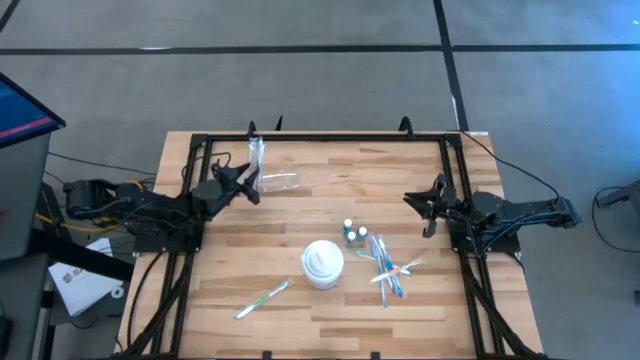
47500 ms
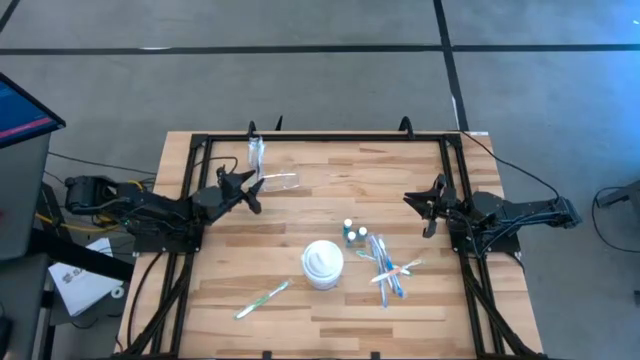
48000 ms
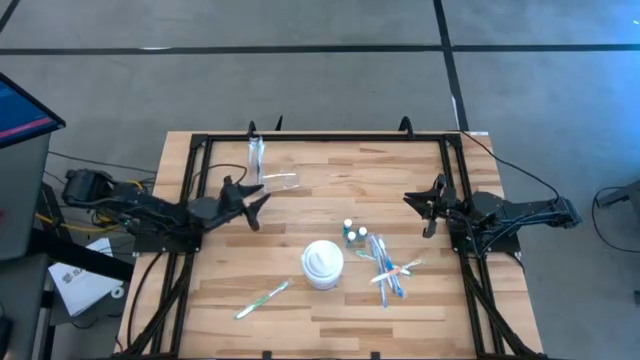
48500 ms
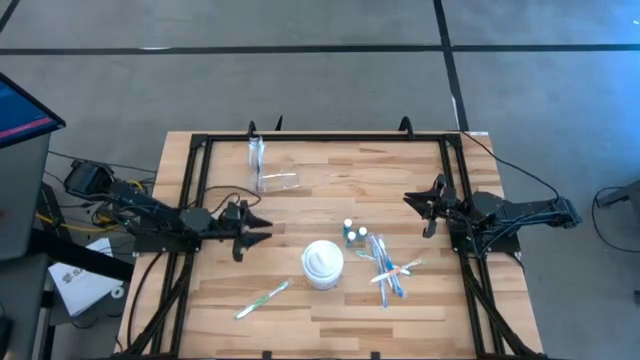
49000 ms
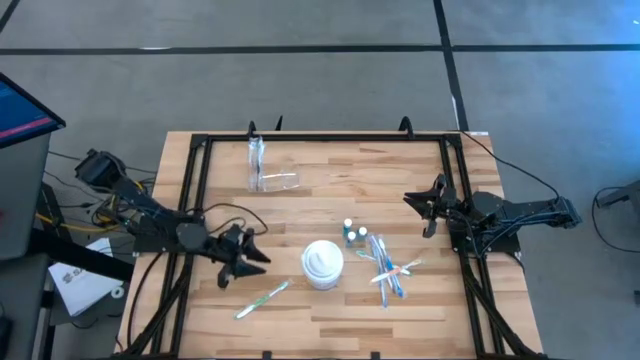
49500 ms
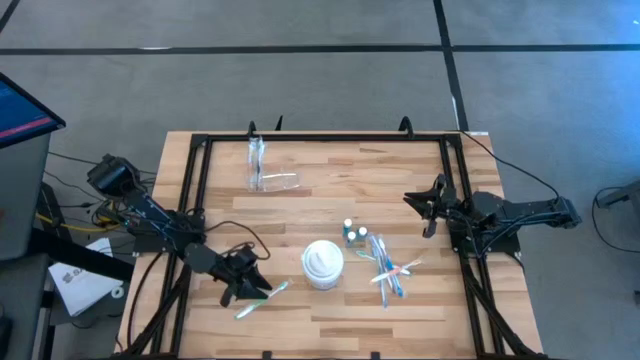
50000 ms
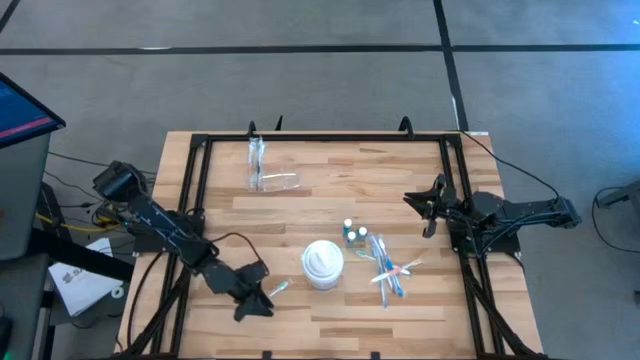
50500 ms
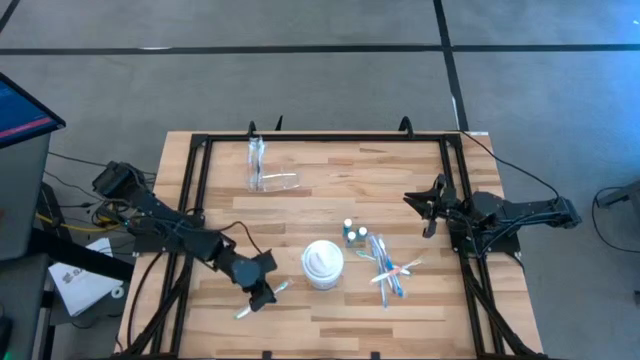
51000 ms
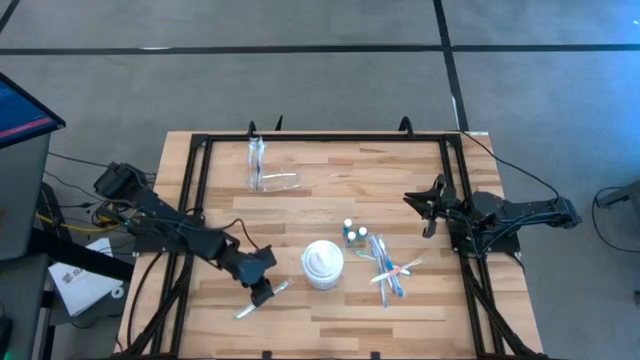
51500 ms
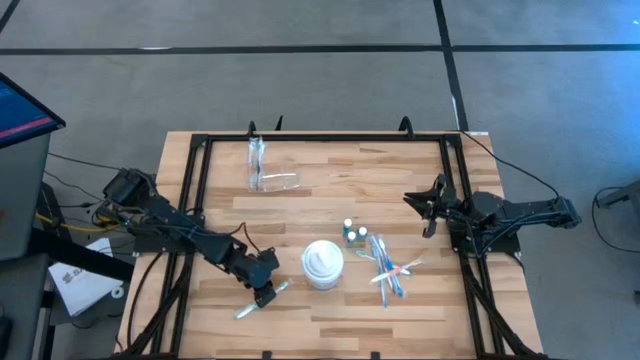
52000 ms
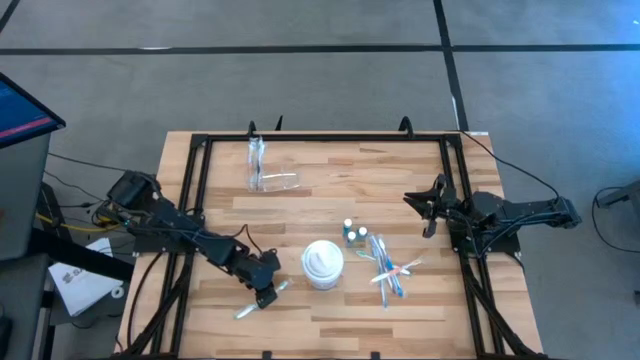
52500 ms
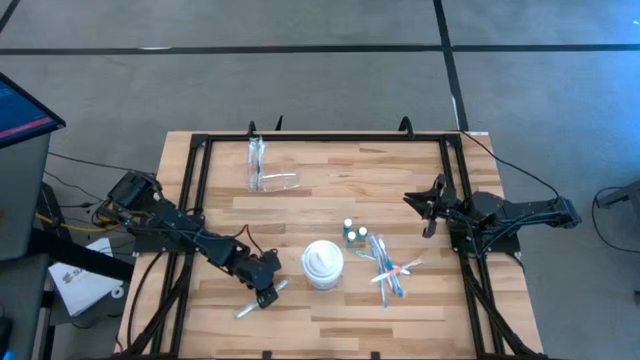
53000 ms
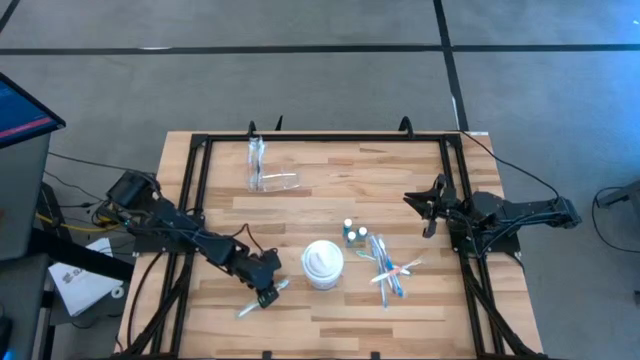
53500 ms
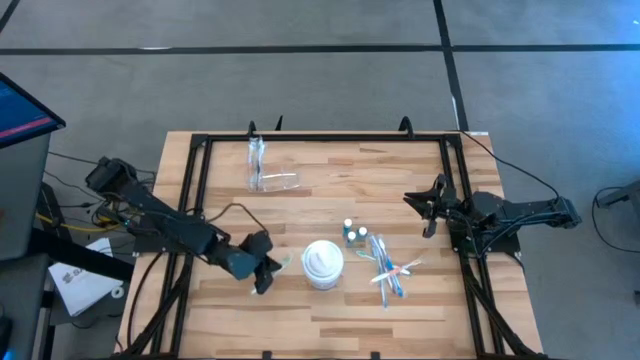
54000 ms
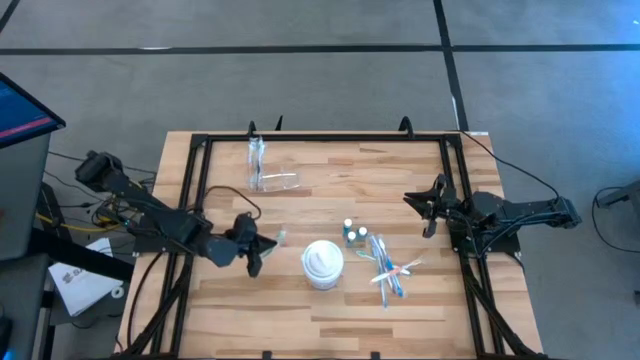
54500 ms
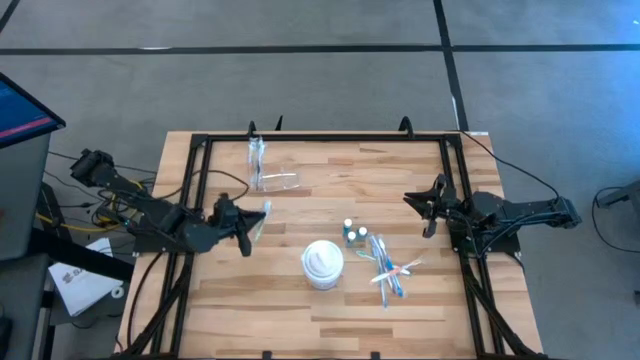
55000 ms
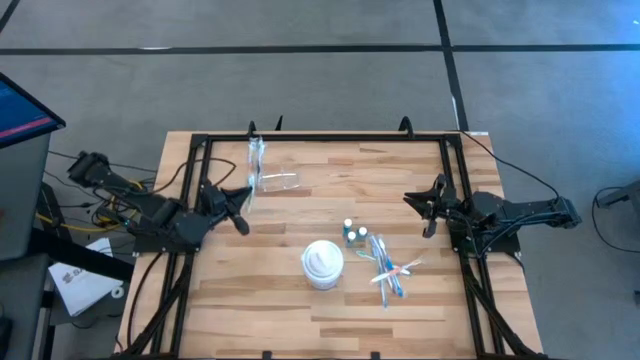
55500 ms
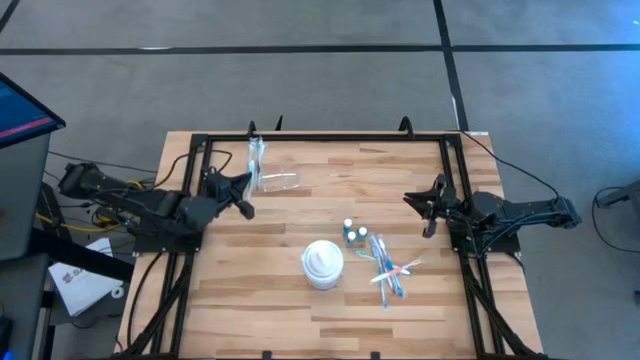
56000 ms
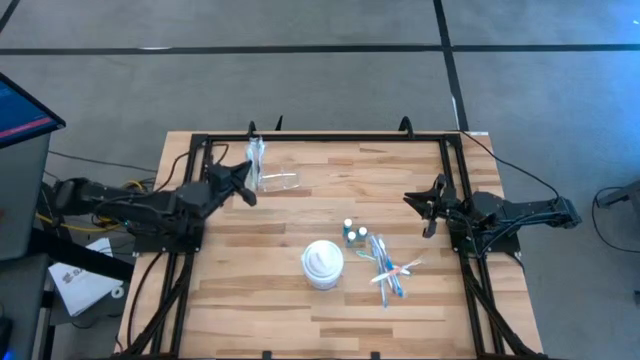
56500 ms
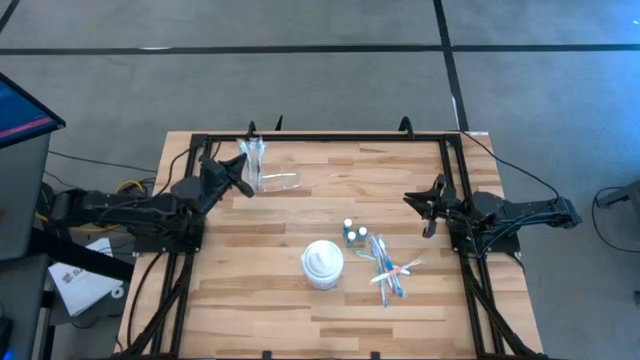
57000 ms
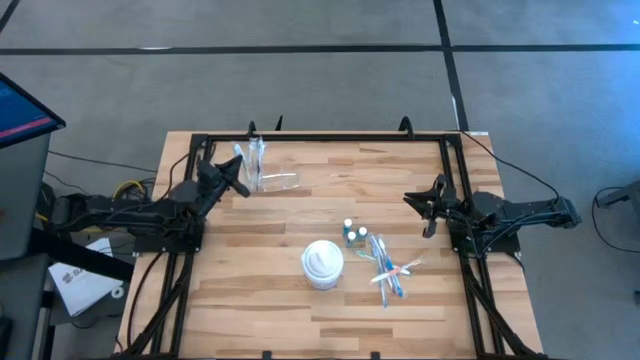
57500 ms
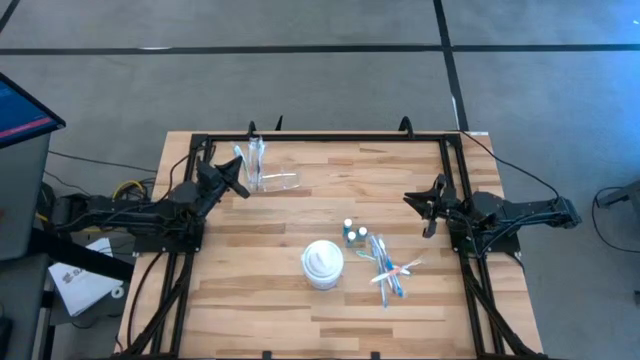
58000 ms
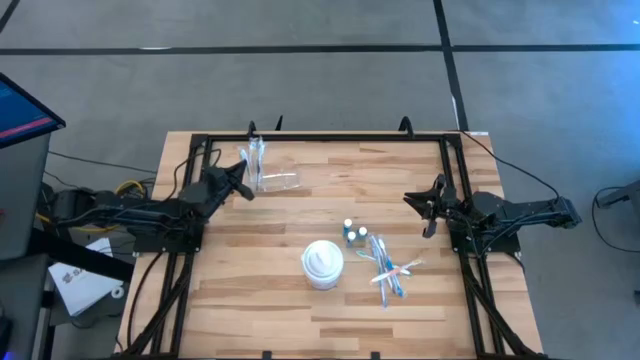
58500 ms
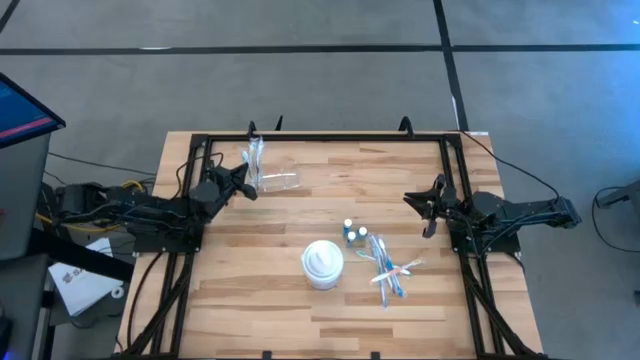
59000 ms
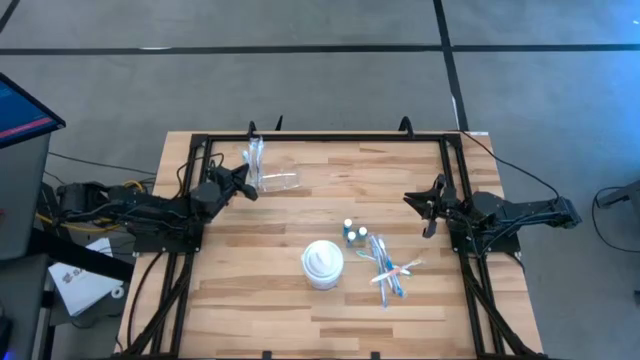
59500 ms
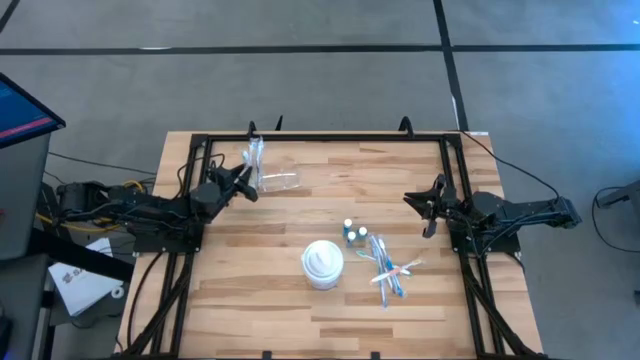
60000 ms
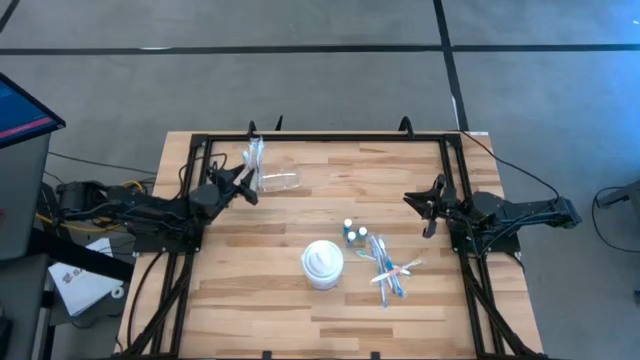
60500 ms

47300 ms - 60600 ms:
Task: Pick & Place toothbrushing station
Put the left green toothbrush into the transparent organizer

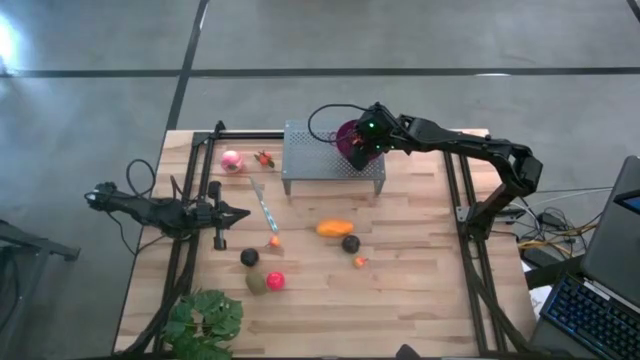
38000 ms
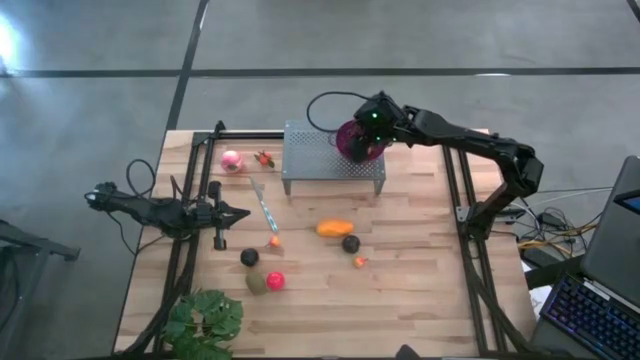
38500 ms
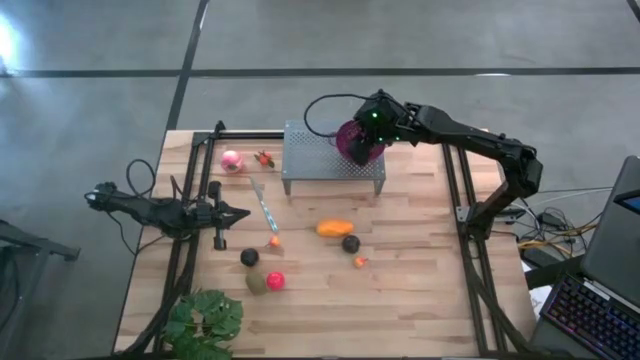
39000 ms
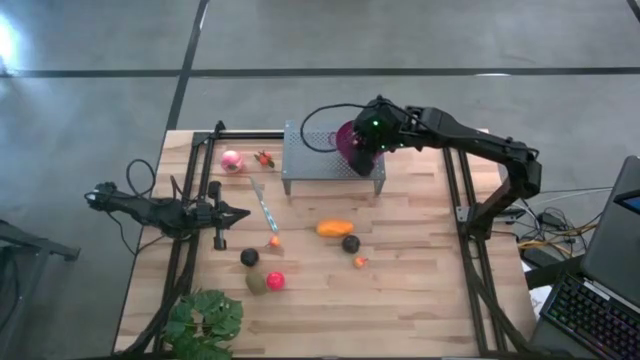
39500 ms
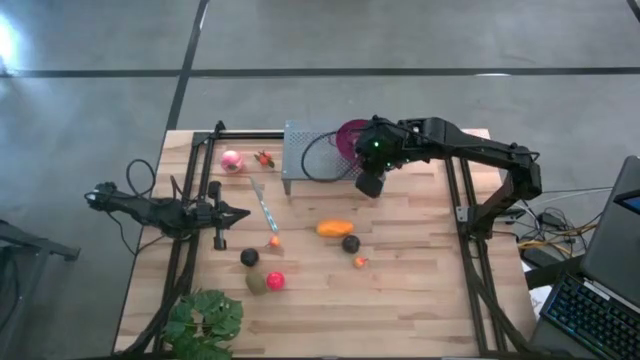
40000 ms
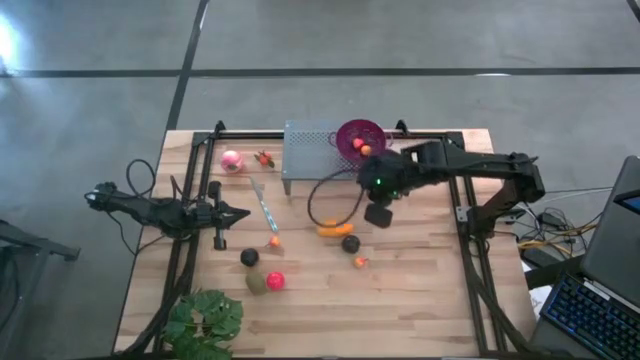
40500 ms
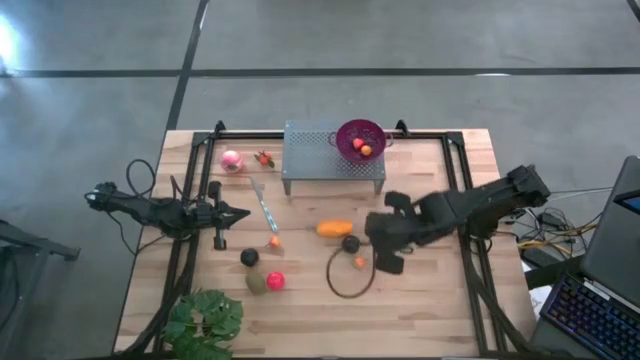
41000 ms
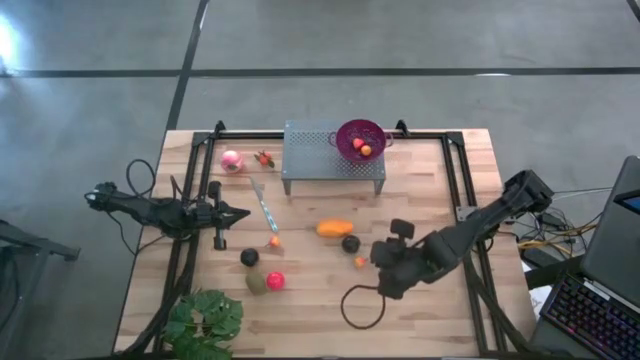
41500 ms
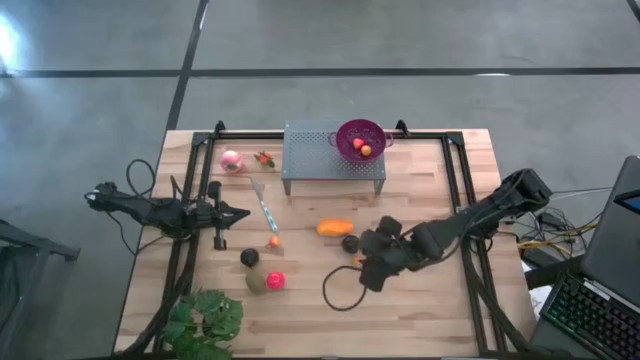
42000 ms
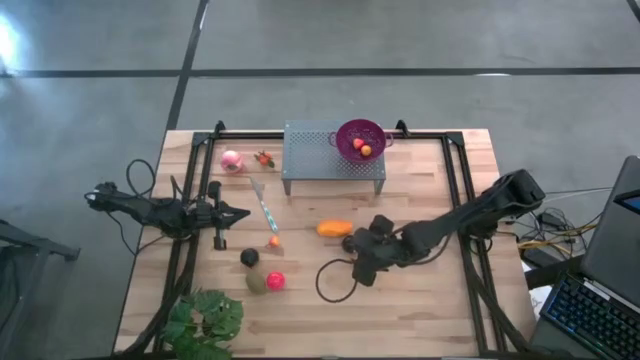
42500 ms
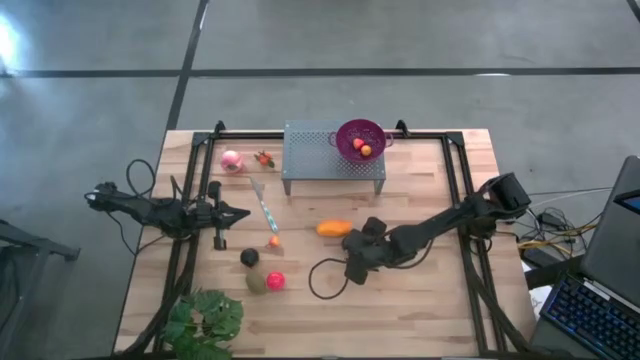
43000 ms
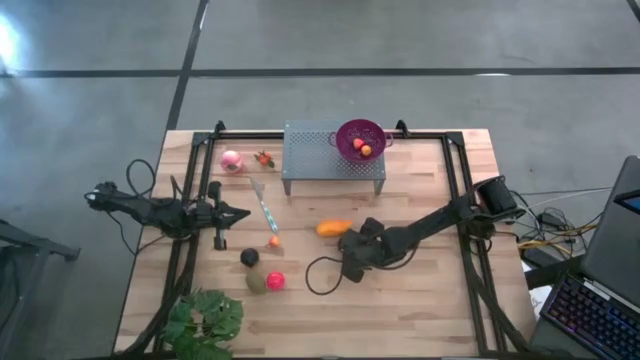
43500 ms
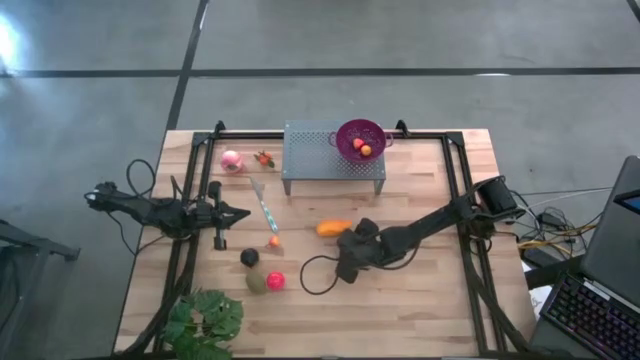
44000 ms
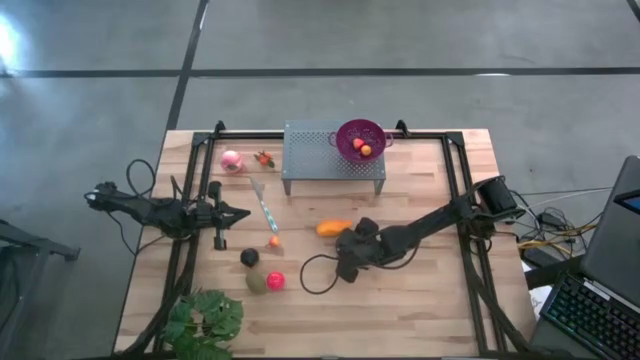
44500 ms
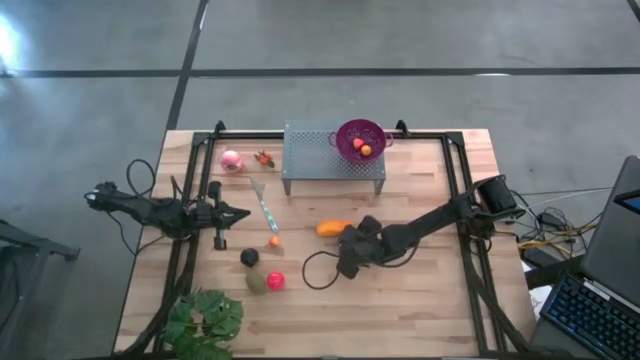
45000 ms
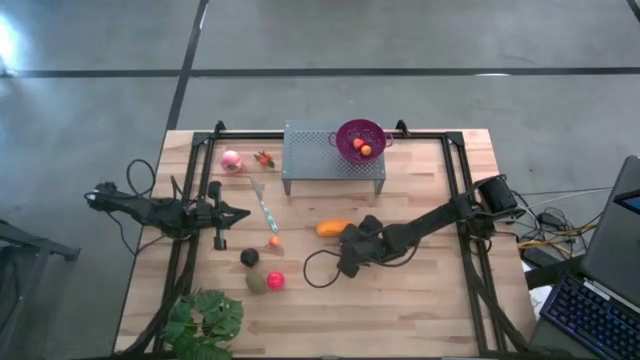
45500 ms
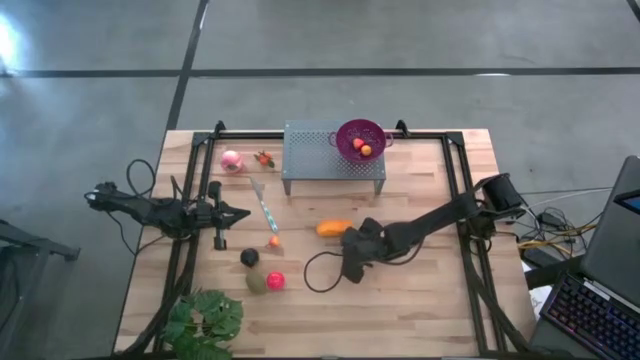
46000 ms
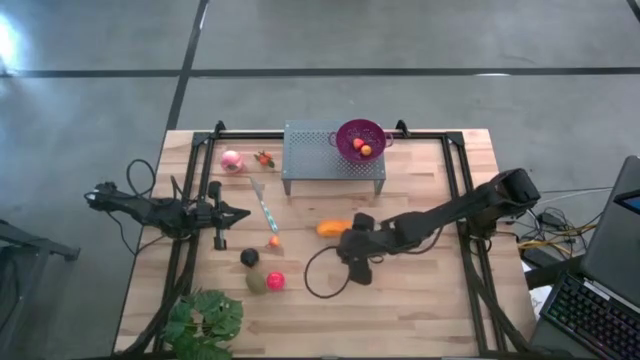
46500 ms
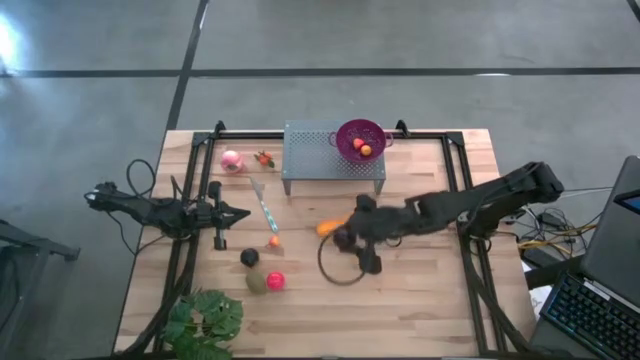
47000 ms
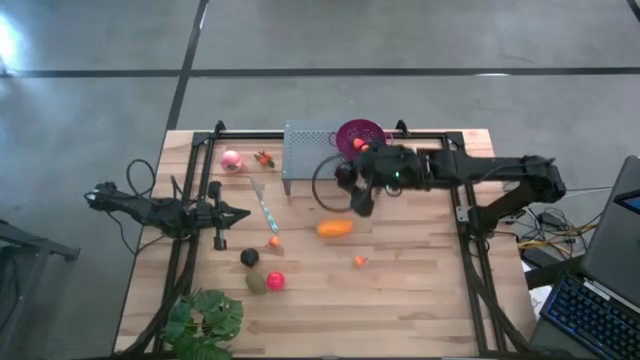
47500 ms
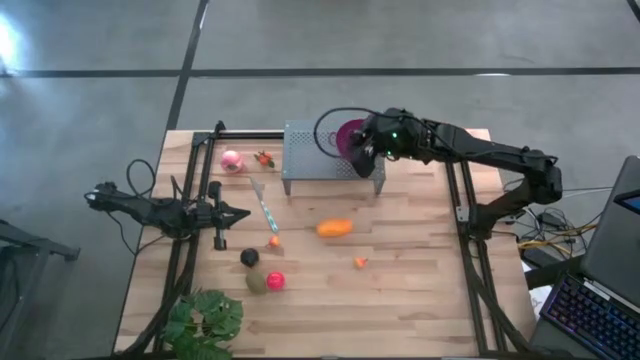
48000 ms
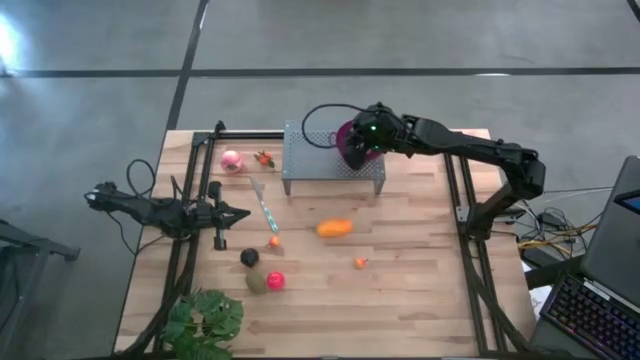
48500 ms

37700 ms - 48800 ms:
Task: Pick & Place Fruit
Put the black plum into the purple bowl on the shelf
